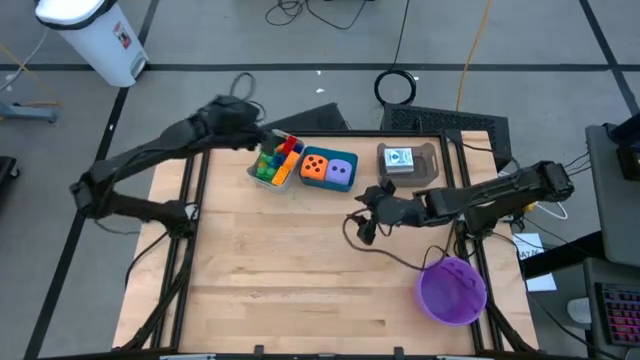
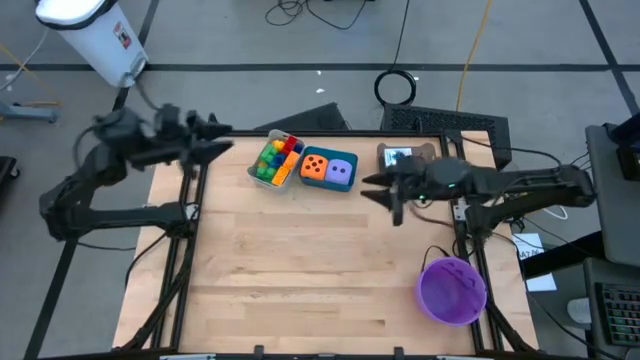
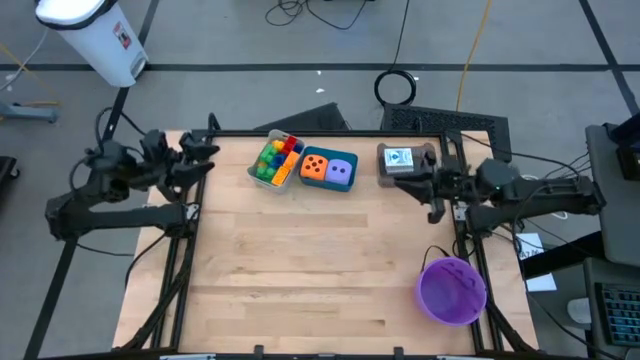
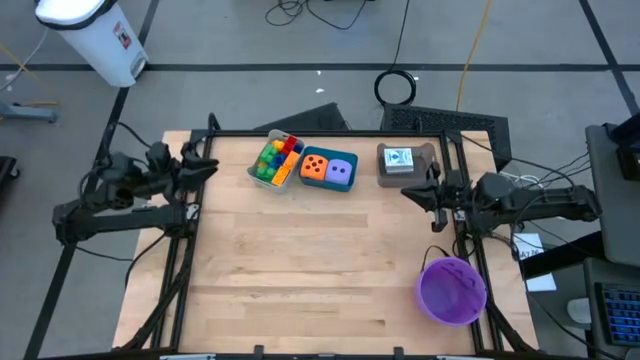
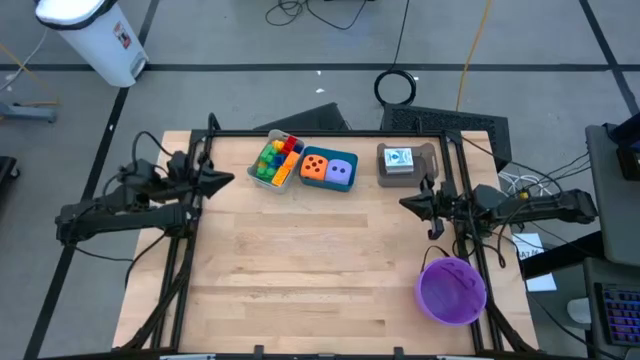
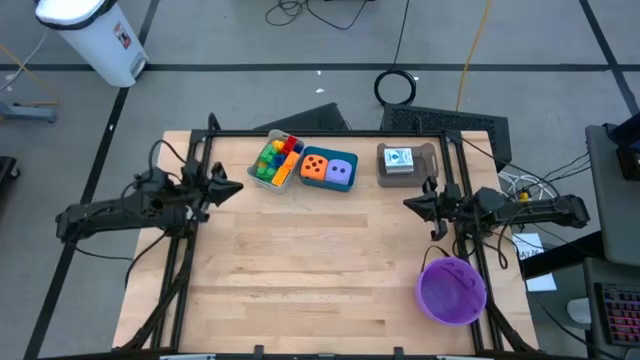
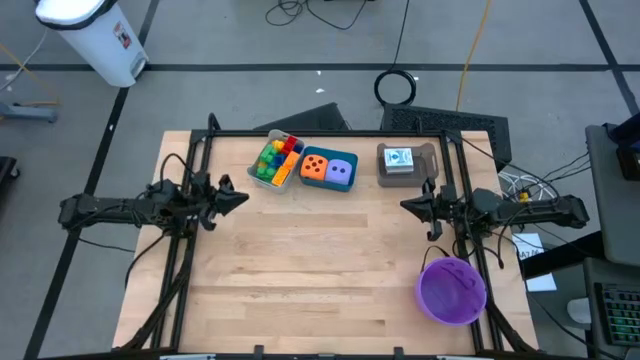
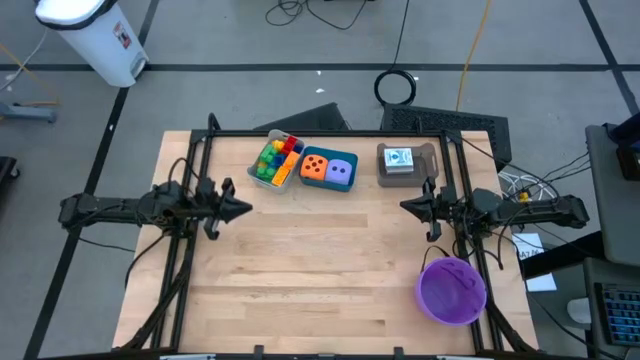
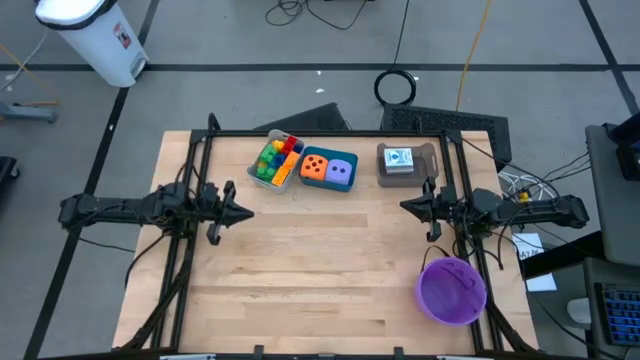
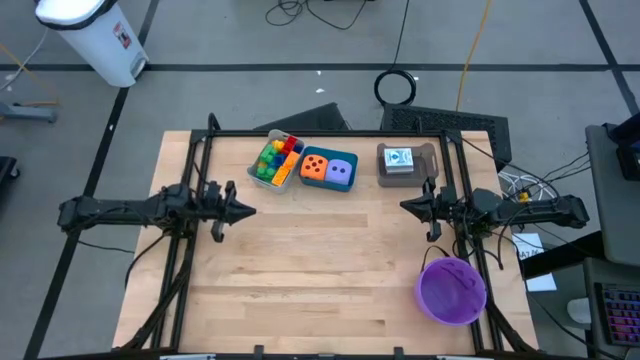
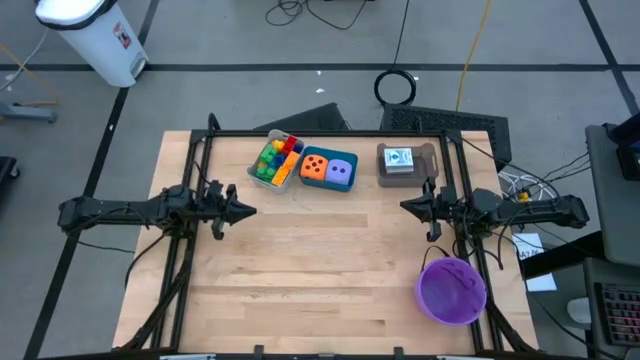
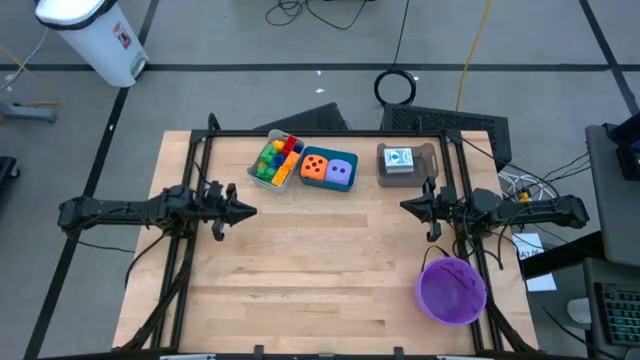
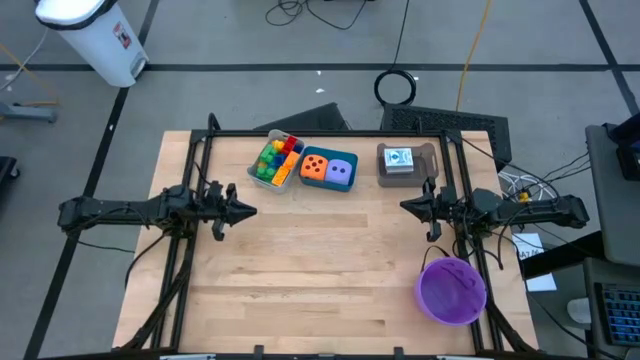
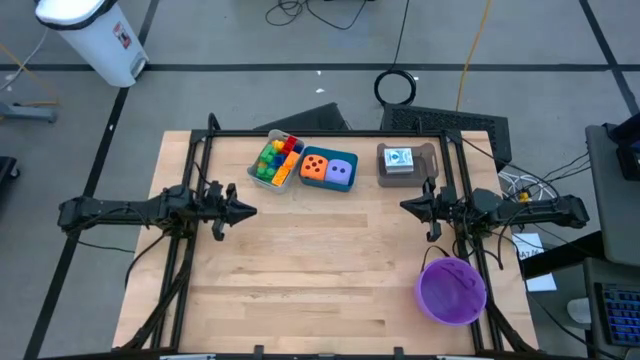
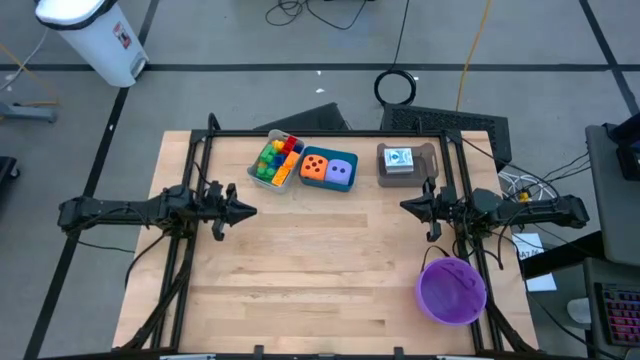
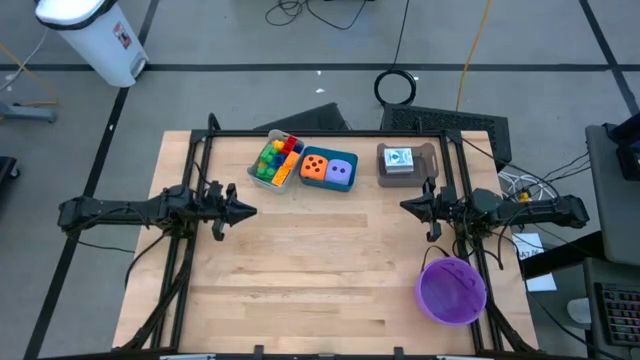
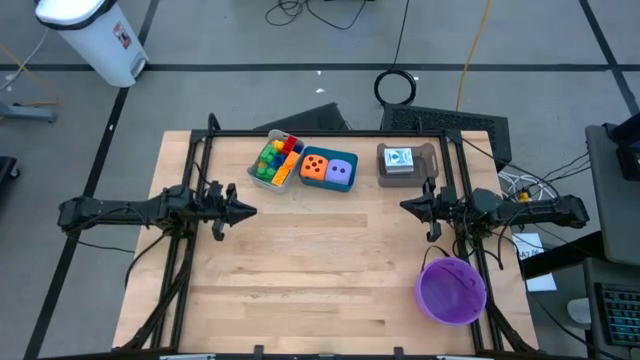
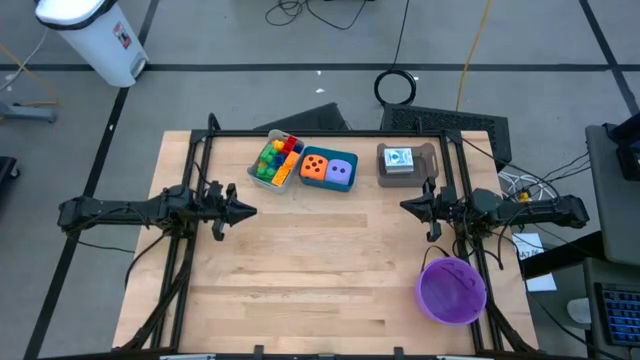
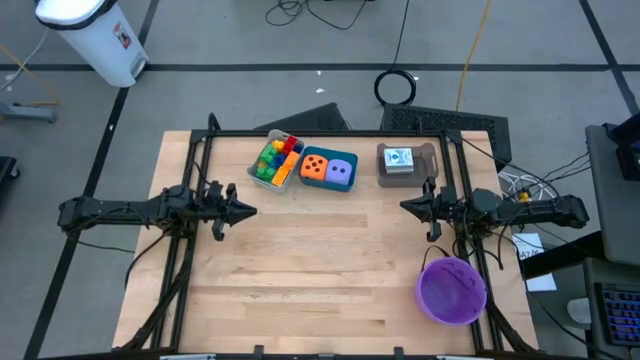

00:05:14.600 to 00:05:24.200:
Task: Pick & Place Toys
Return to home position
